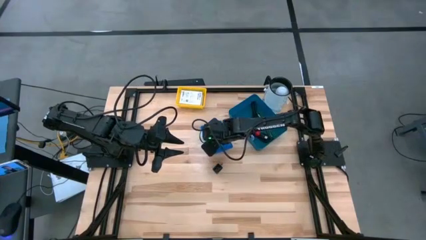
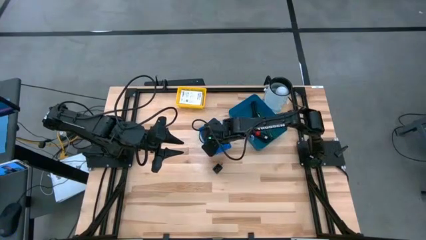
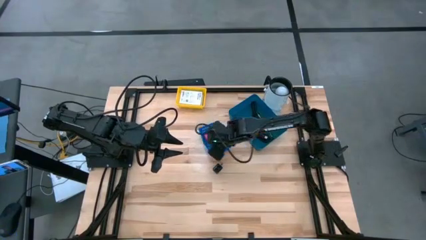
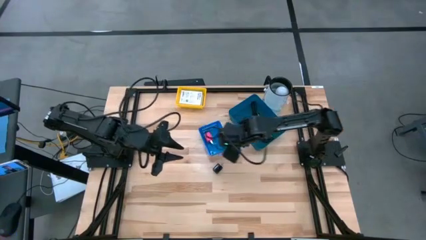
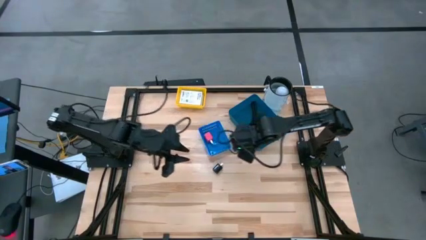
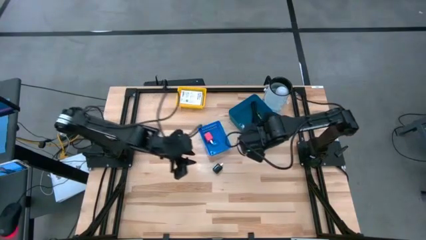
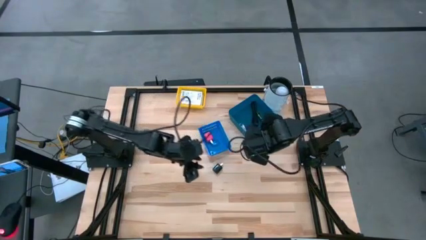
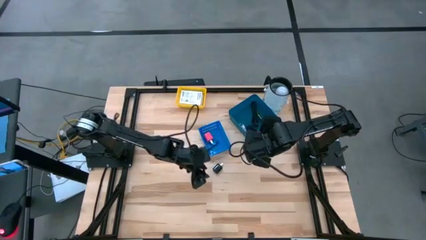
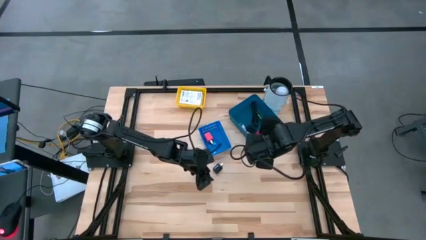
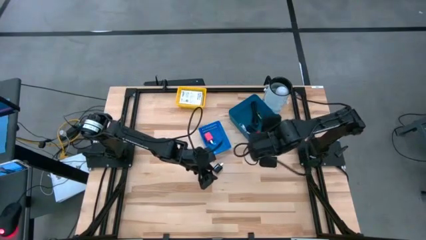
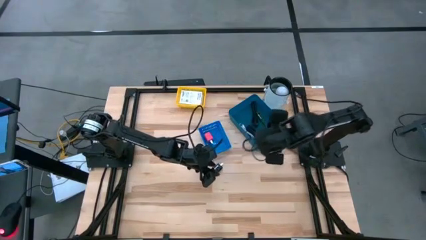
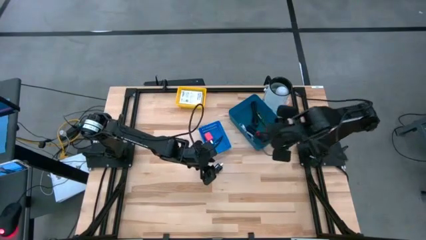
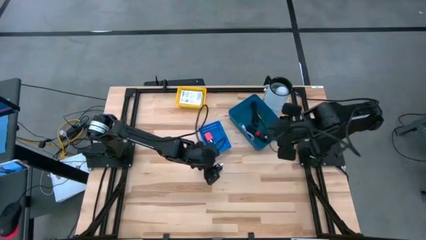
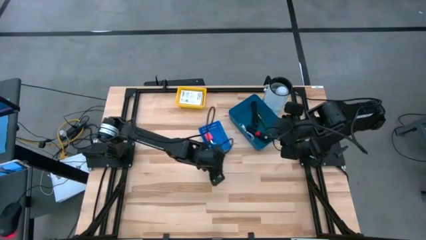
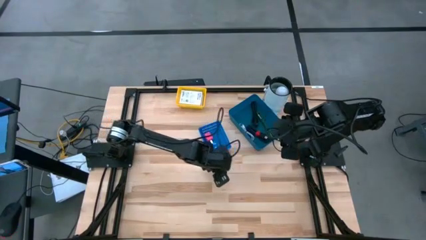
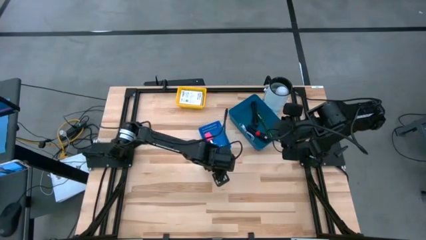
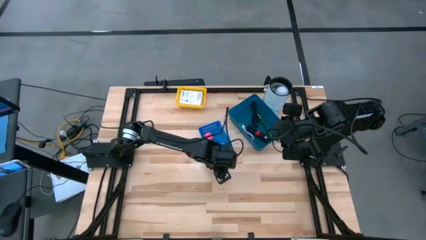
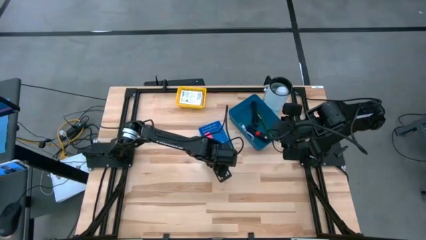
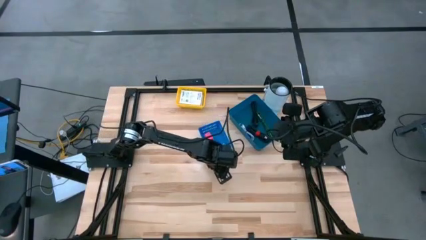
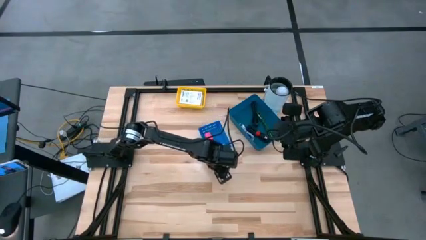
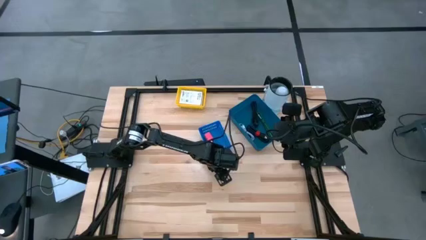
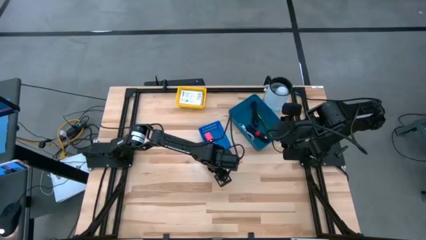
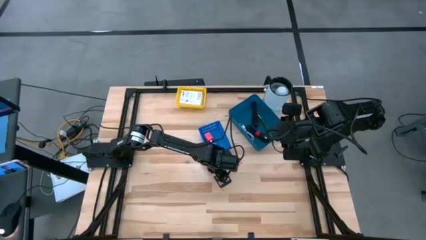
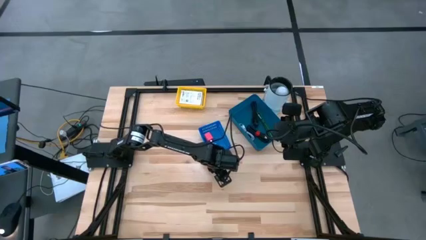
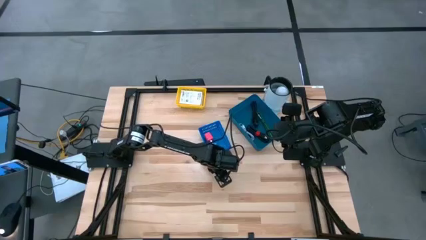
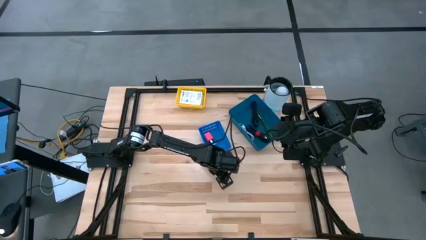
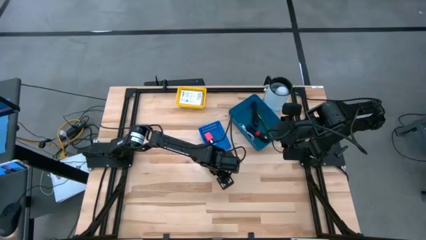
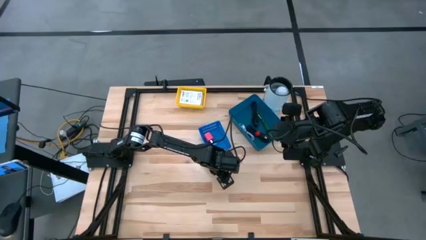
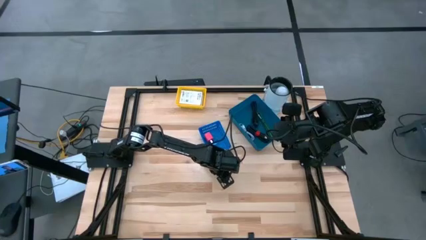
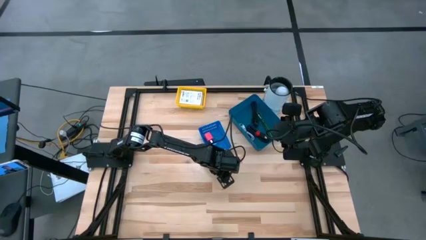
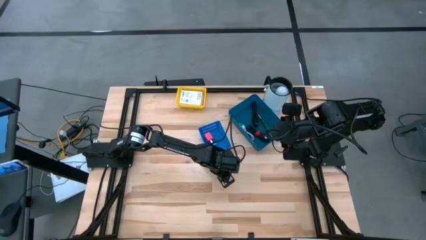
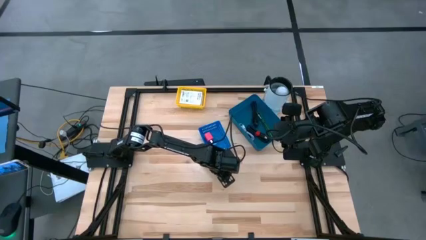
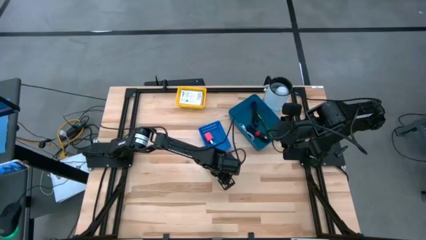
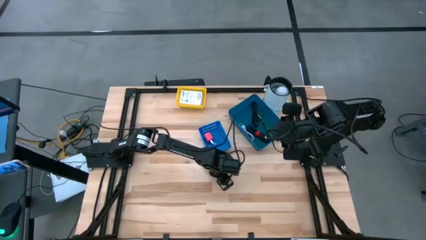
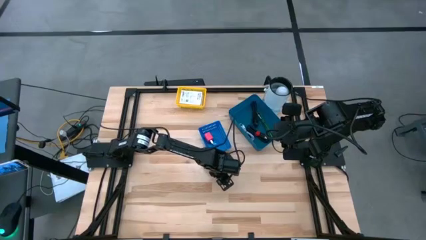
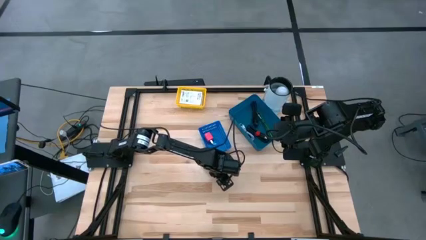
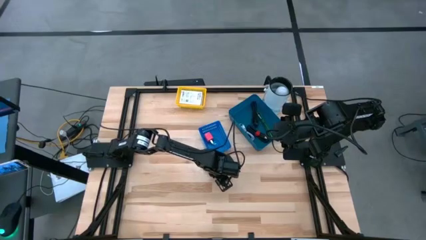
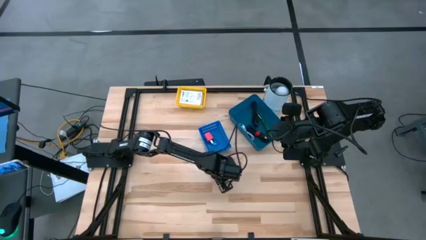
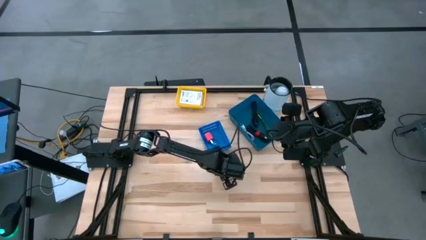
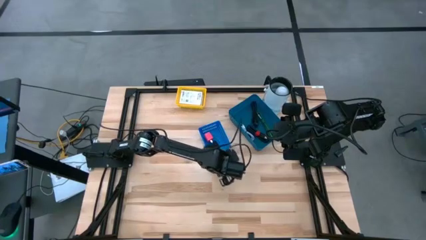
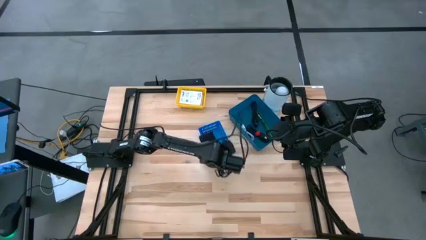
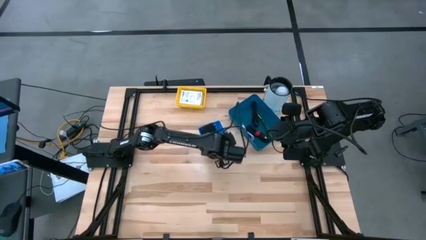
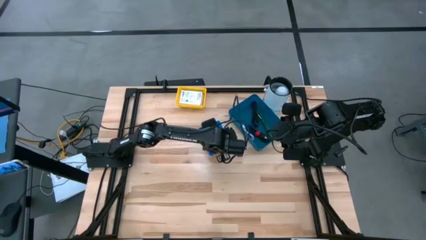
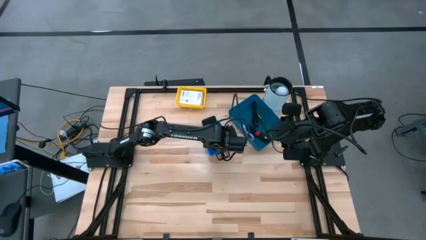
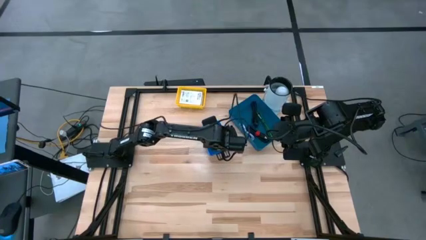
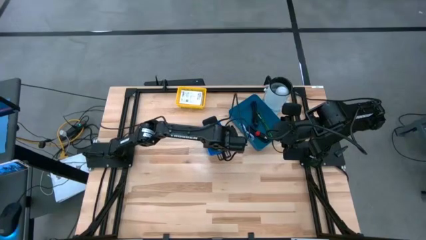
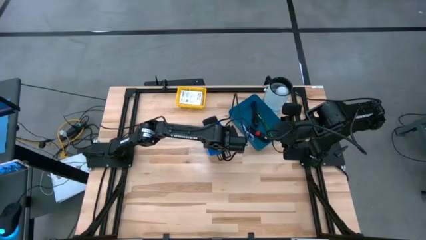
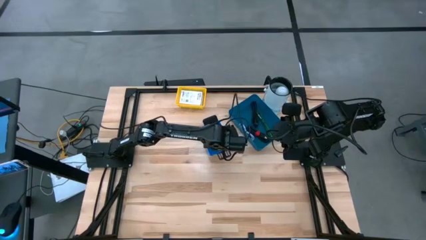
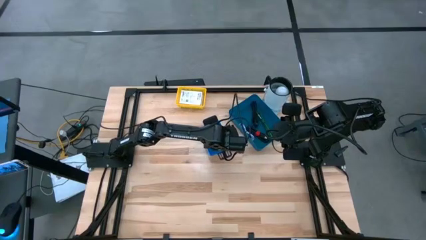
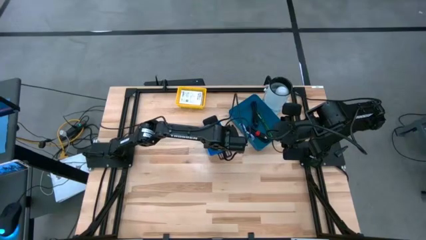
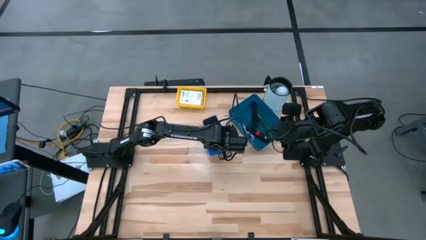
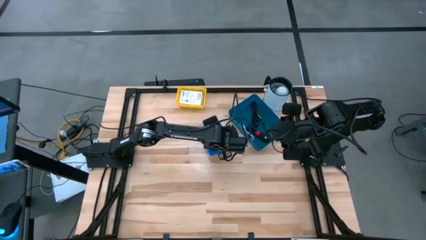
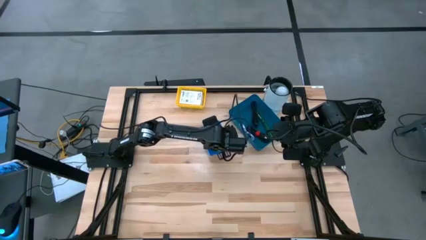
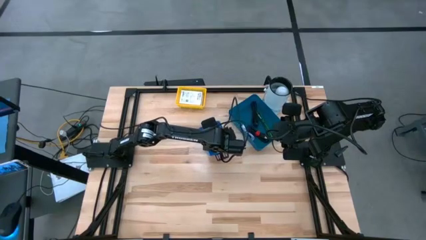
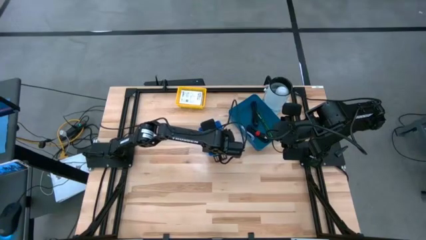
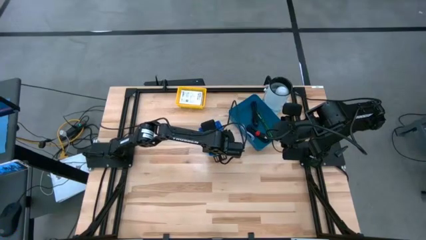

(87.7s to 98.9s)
Task: Pick and place items into bin
Put the black charger adapter into the blue bin

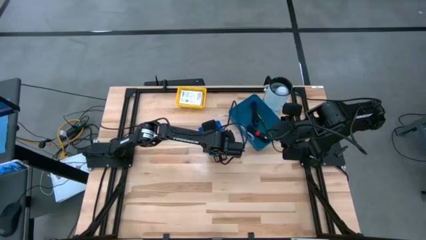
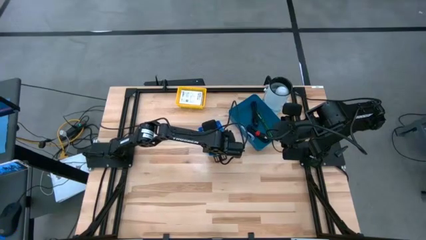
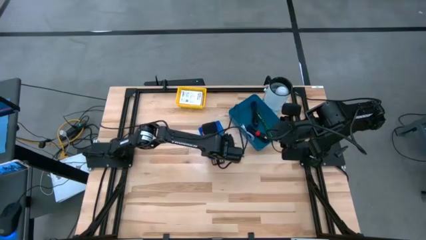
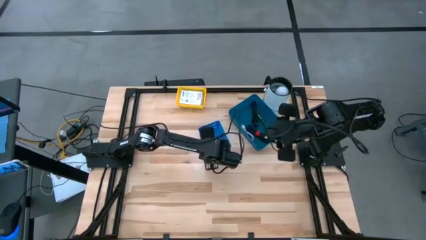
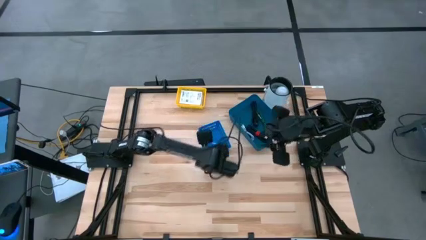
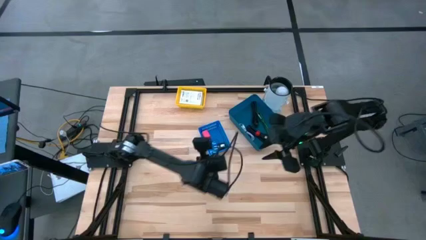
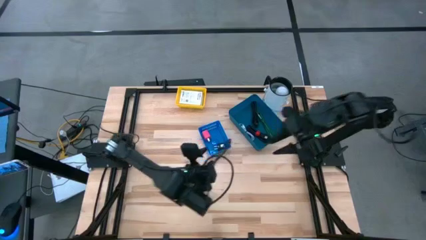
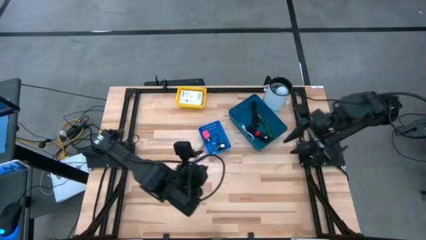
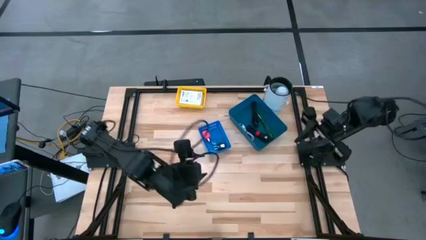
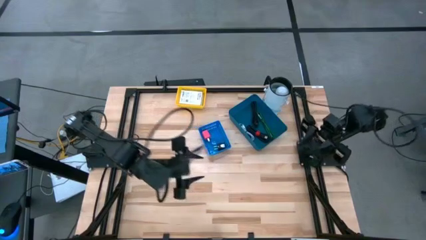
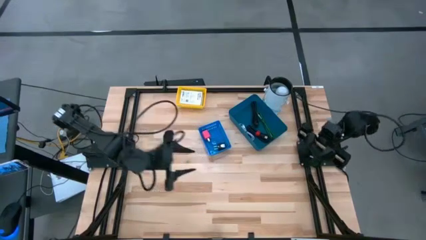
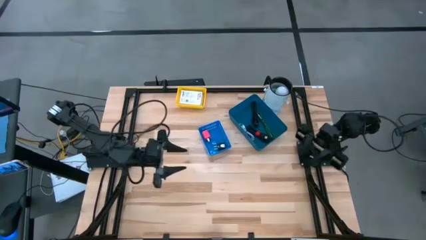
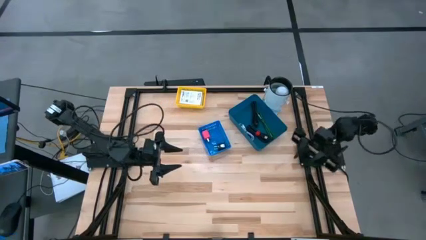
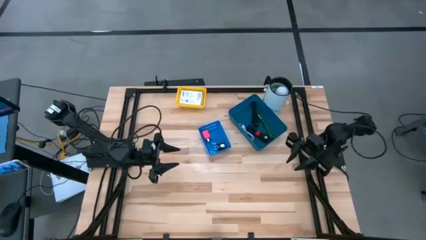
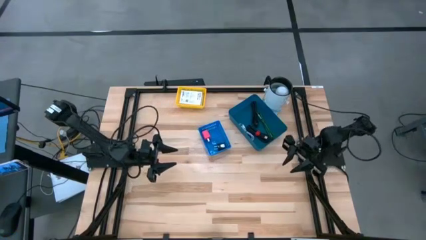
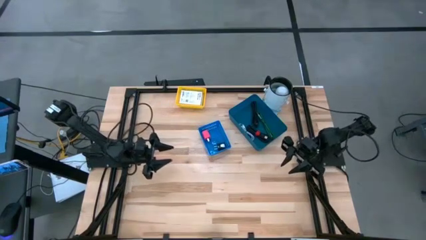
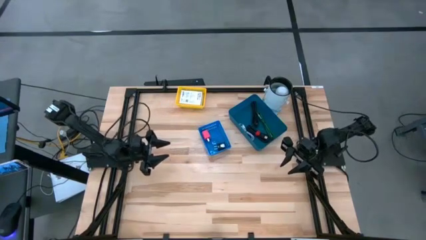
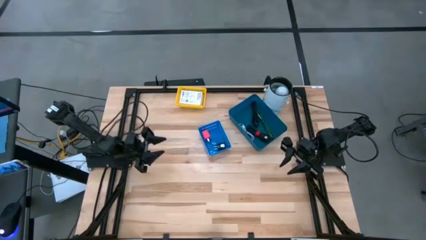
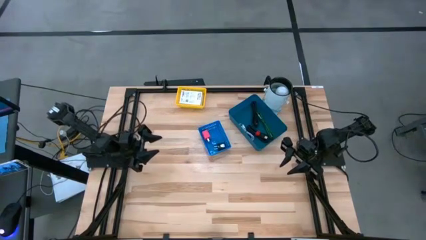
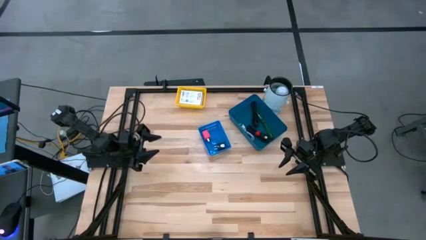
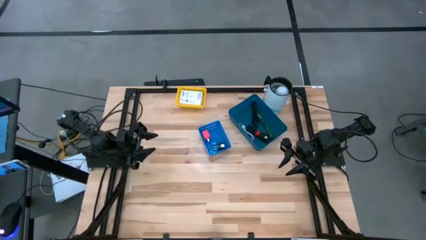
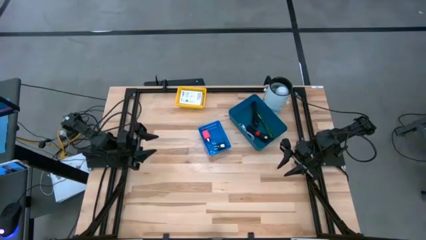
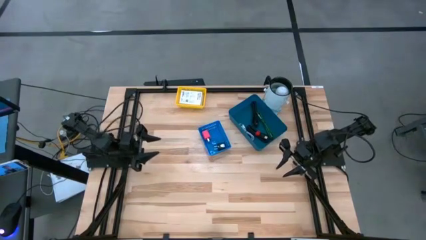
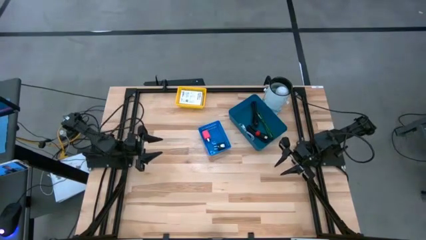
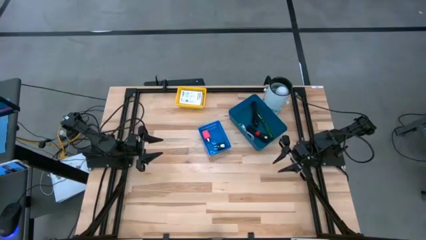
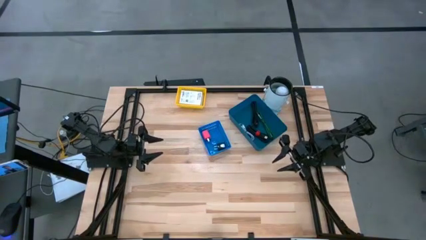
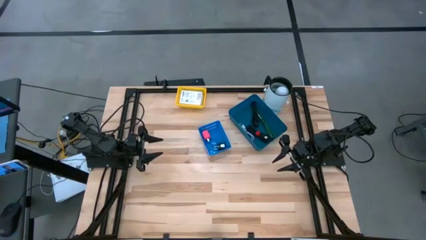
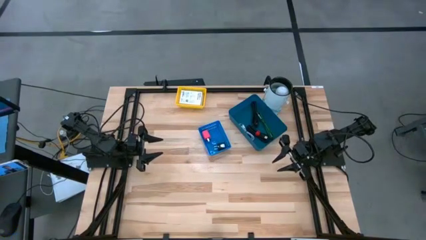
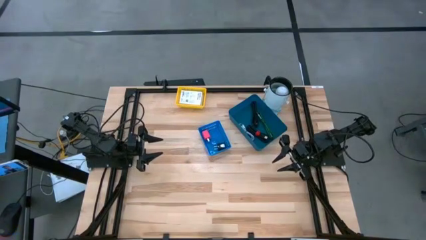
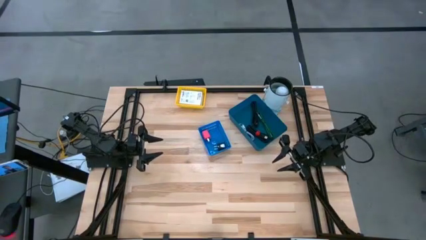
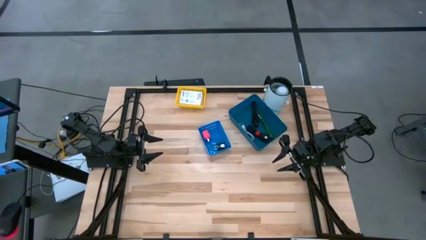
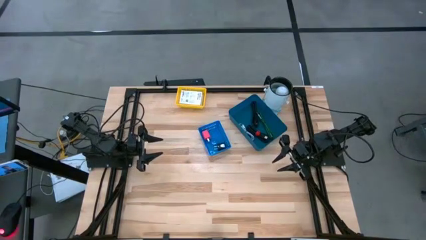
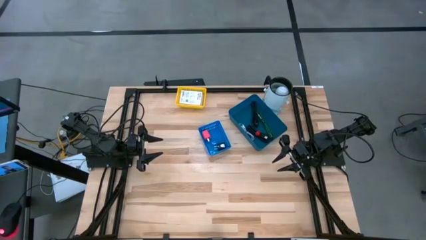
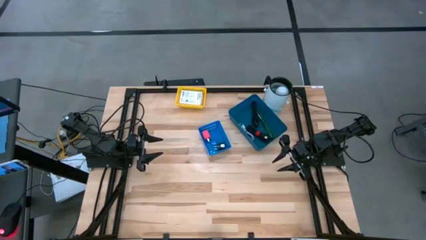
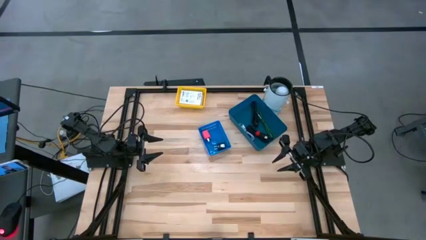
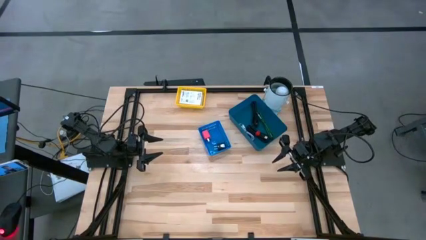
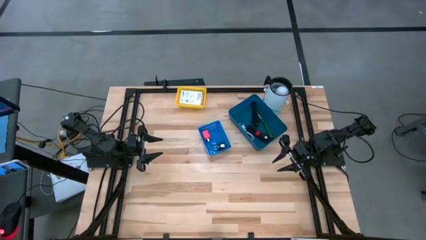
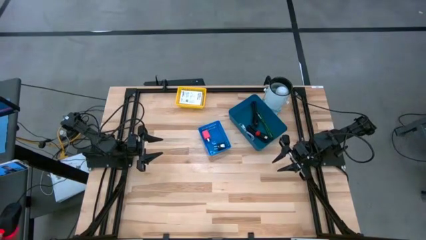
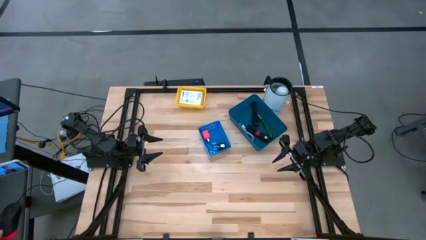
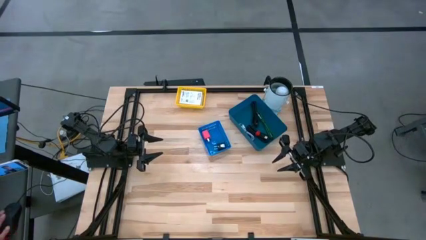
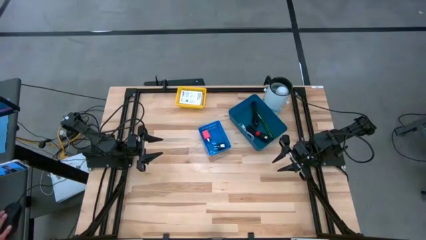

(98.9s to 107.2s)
Return to Home Position
